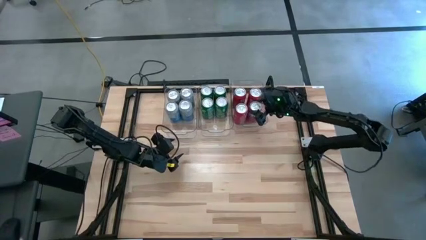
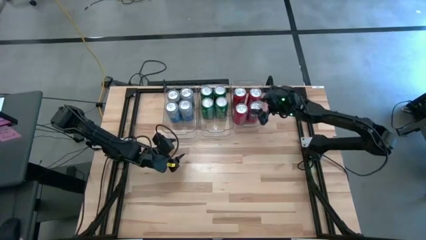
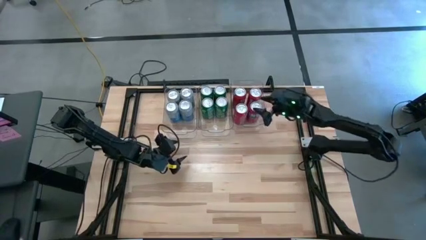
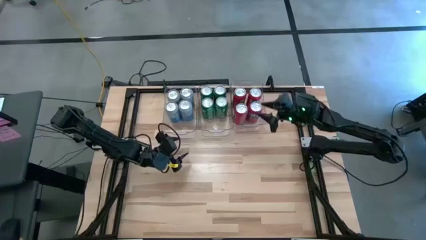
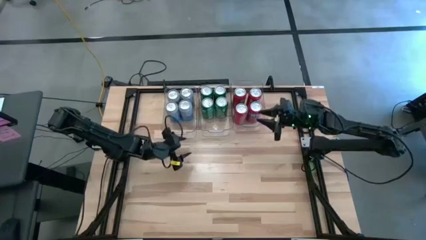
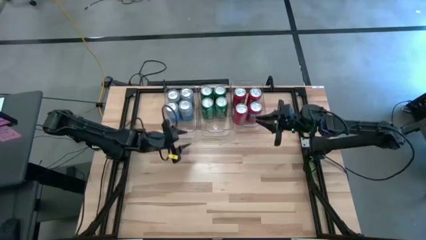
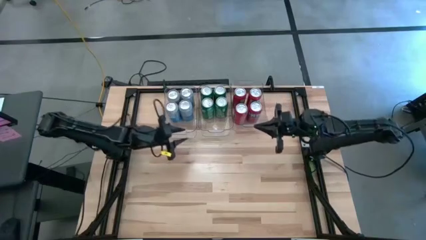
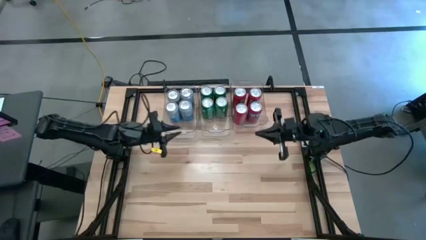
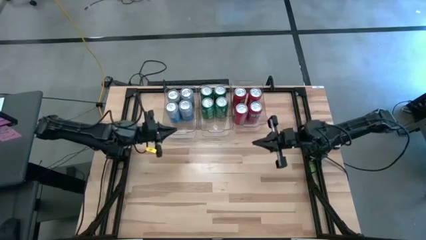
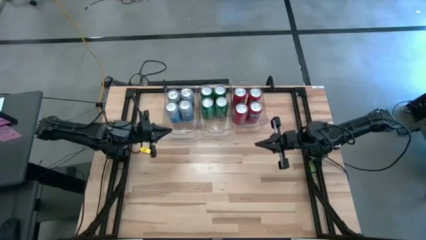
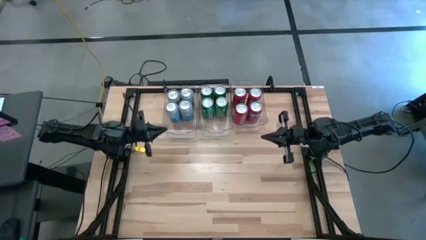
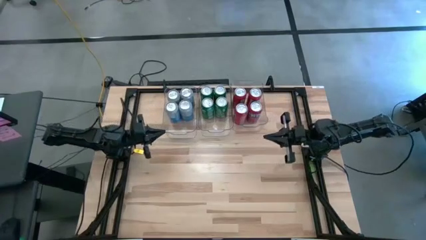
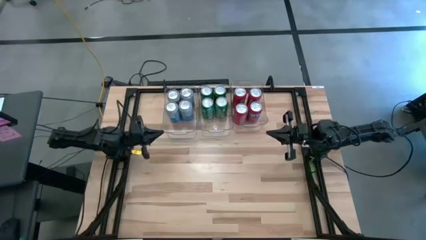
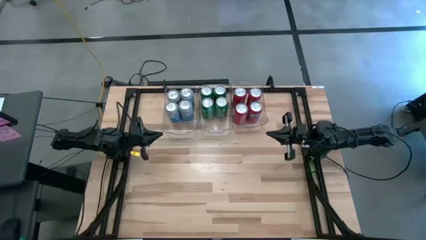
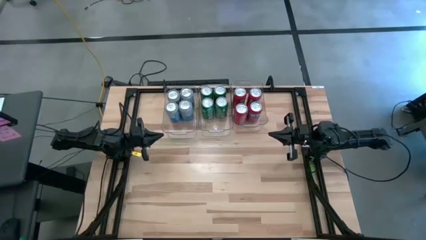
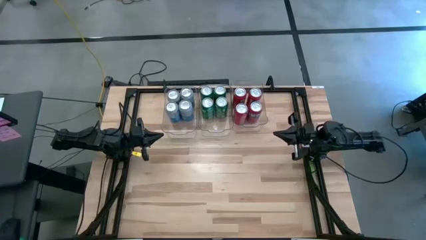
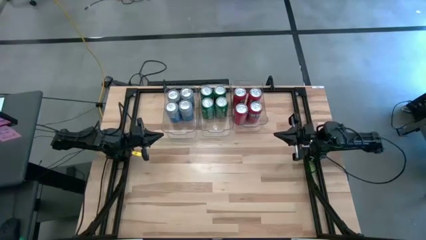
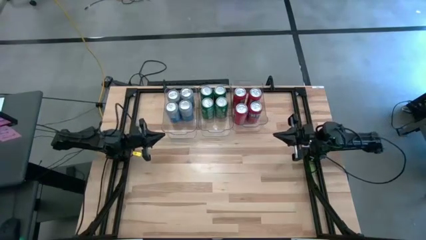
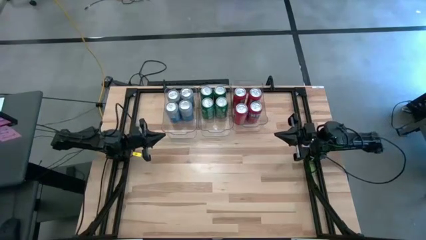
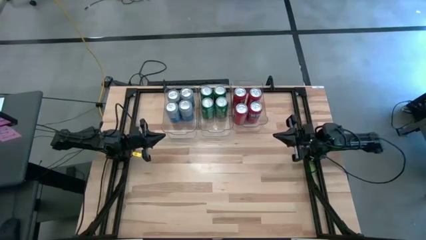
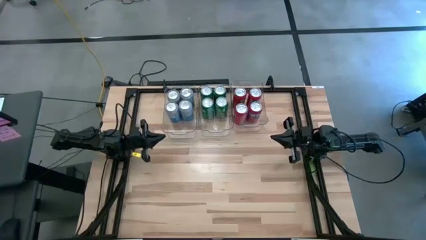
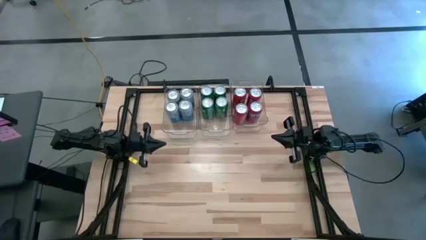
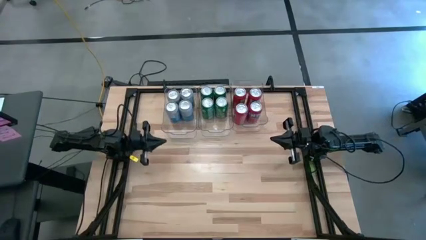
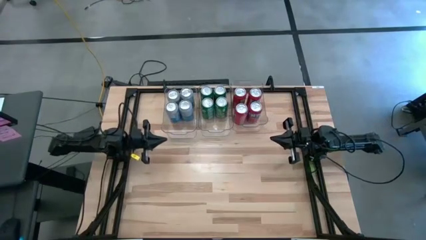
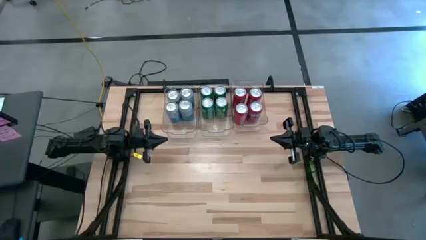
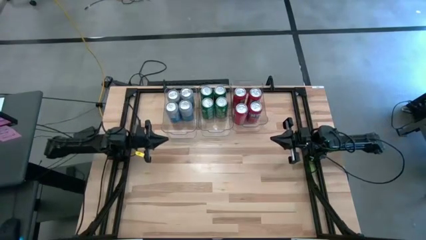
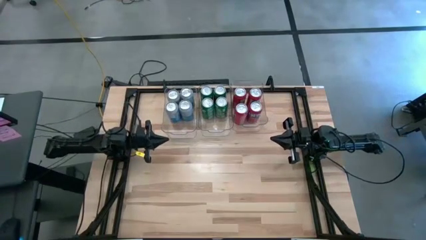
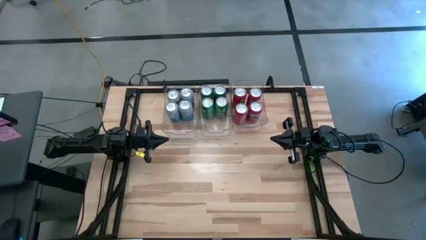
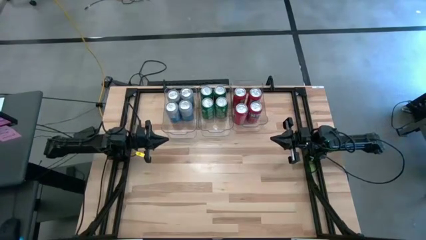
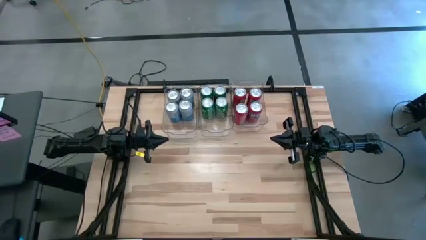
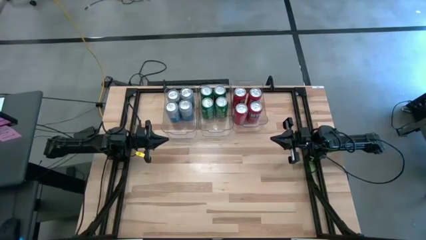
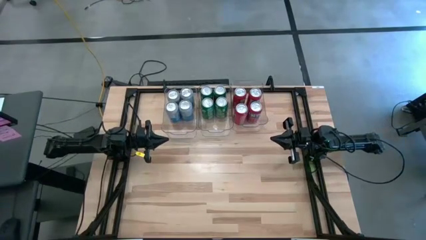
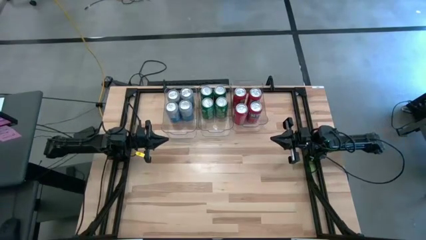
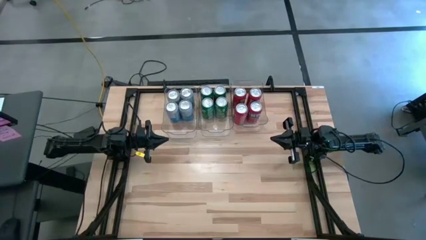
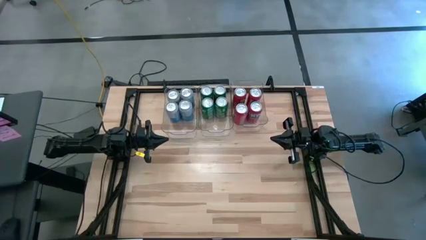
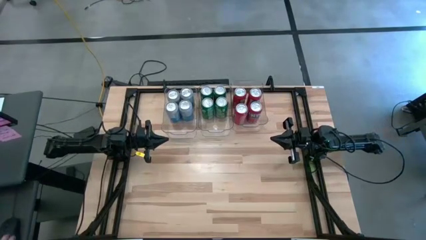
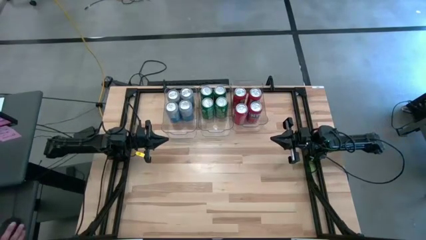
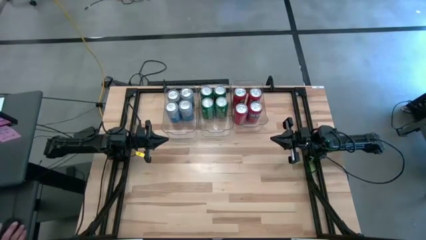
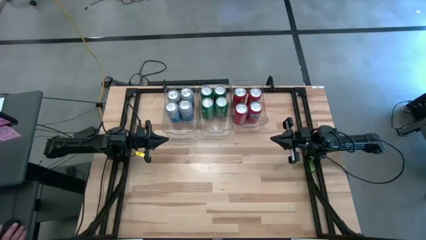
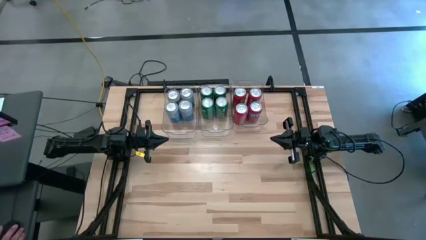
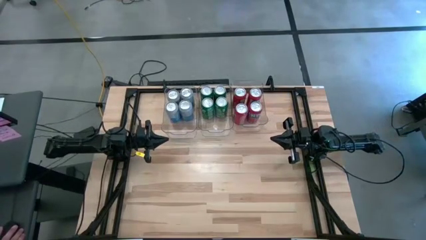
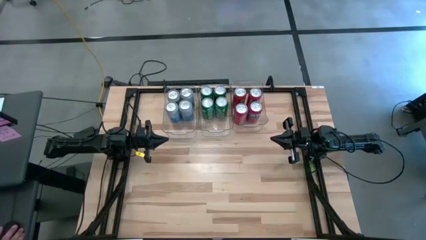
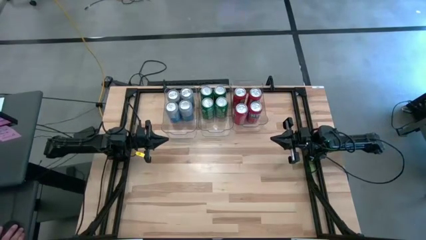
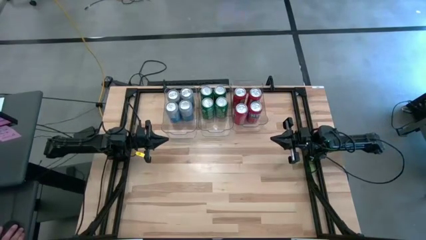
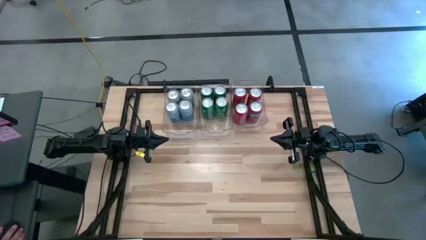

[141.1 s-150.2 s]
Task: Sort soda cans
Return to Home Position

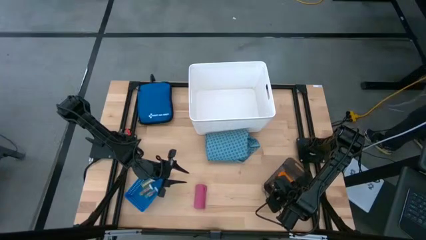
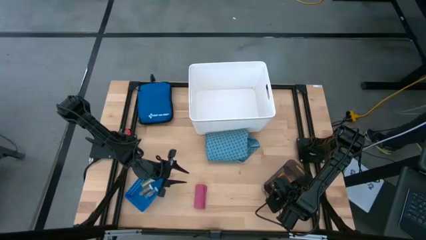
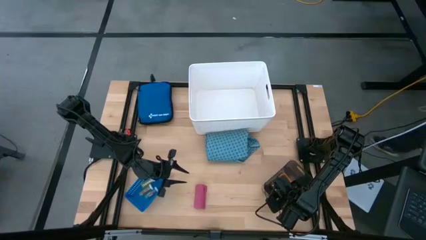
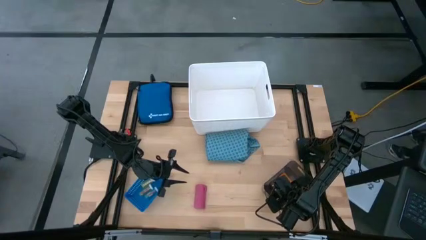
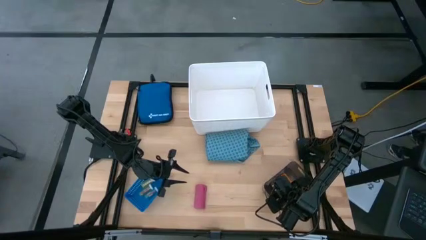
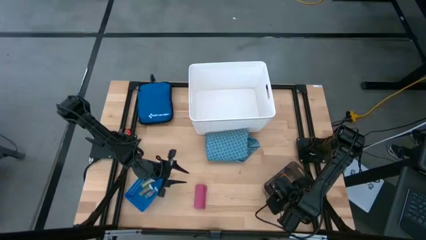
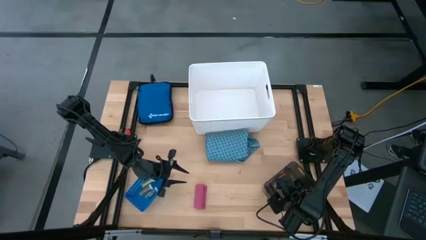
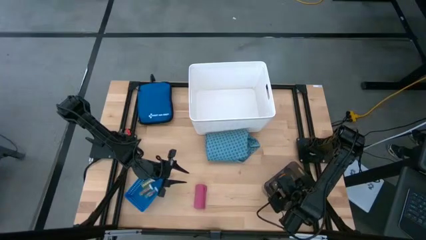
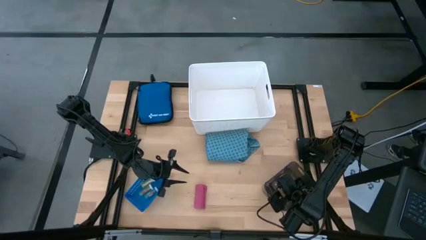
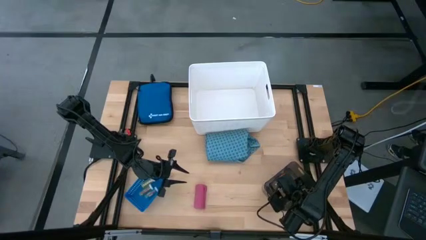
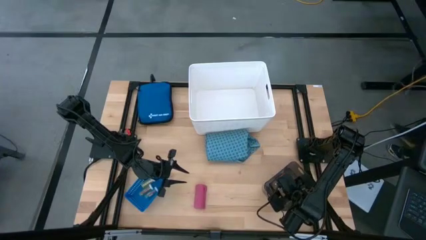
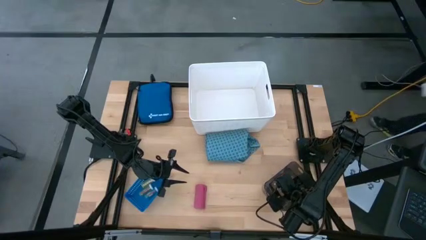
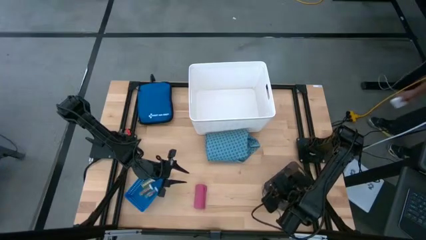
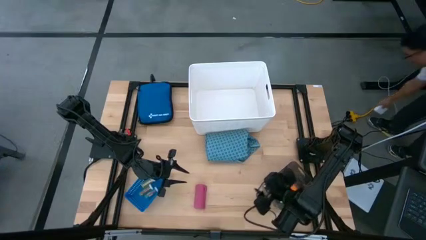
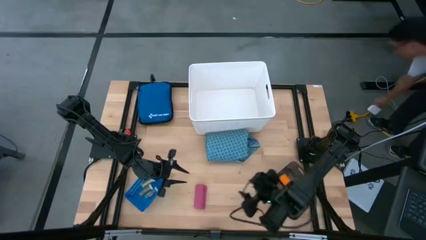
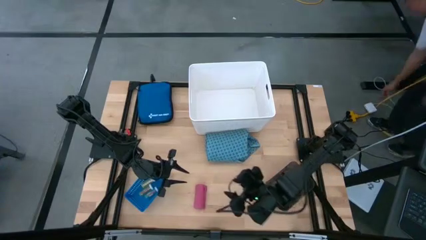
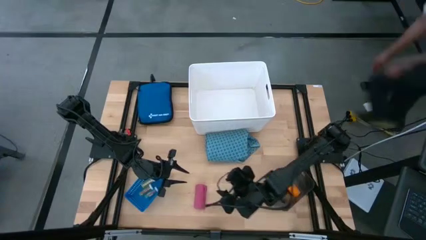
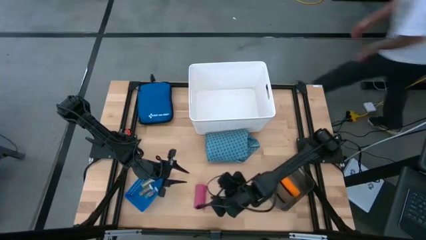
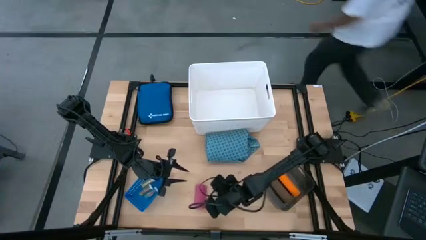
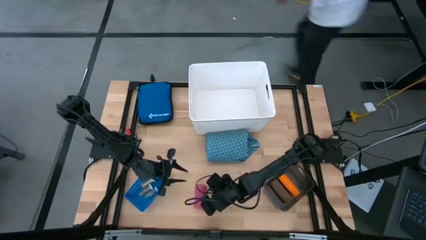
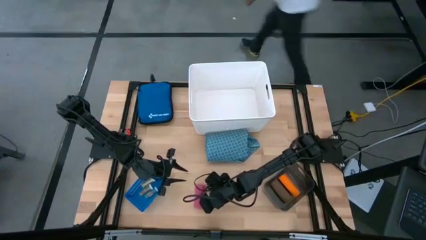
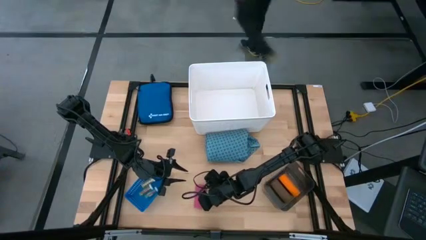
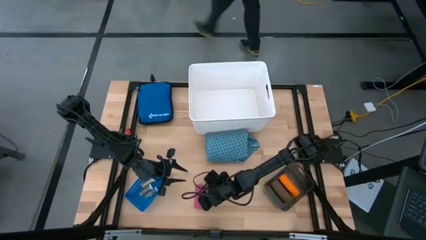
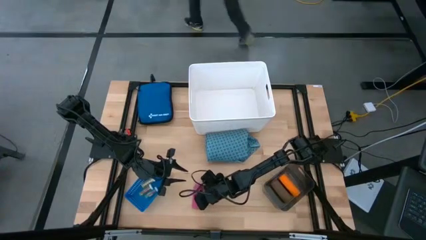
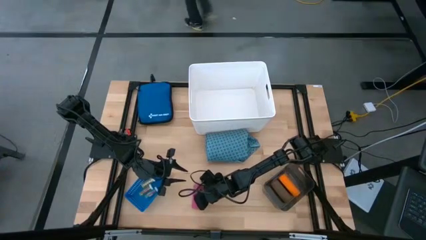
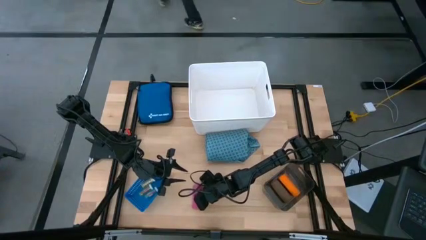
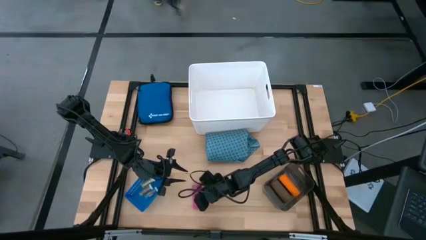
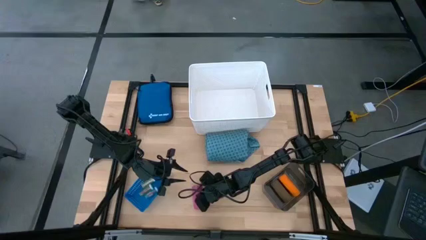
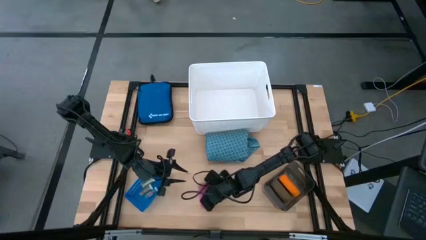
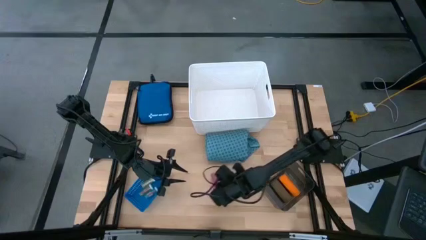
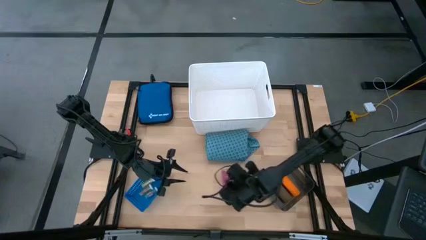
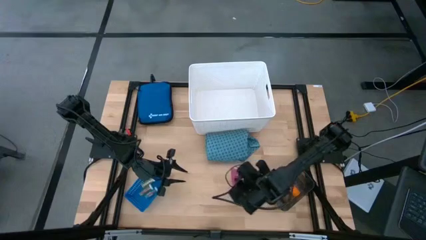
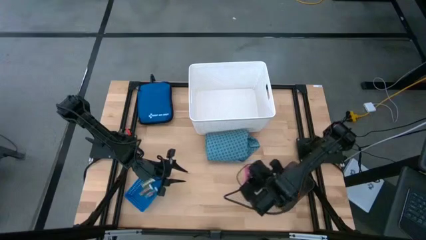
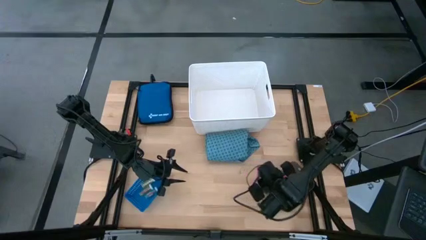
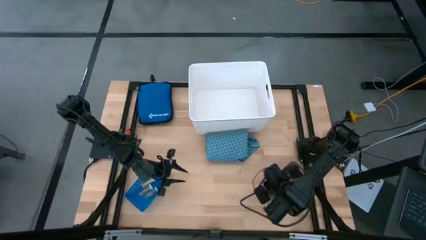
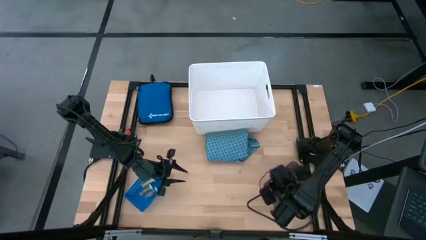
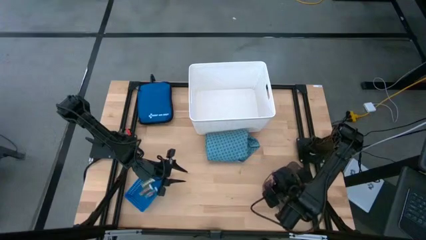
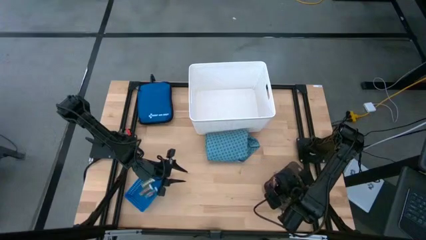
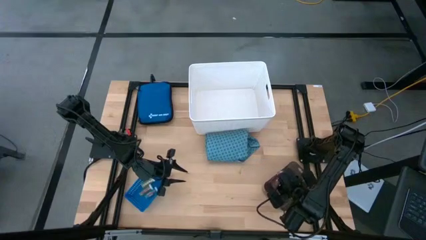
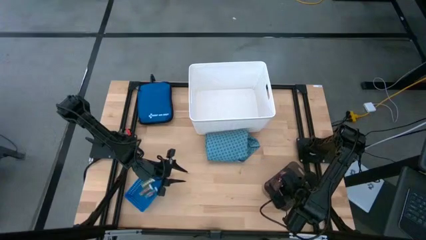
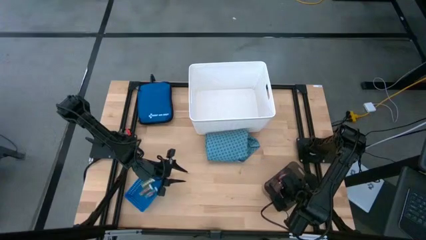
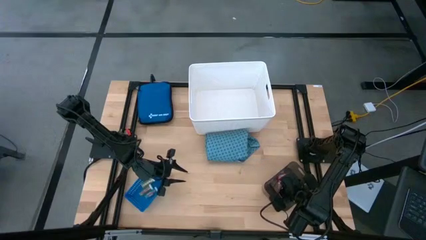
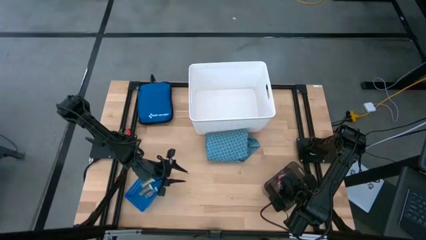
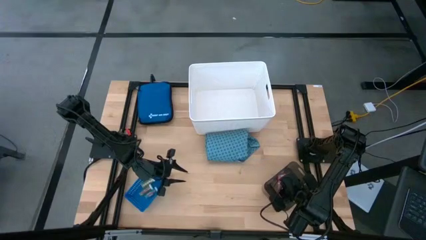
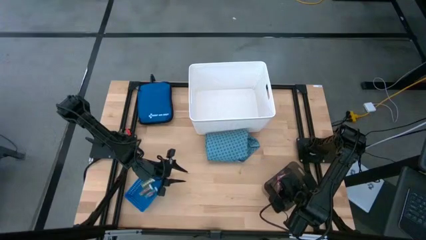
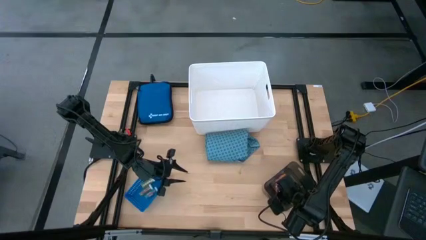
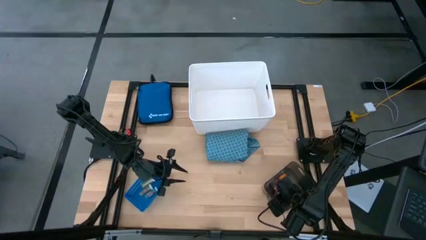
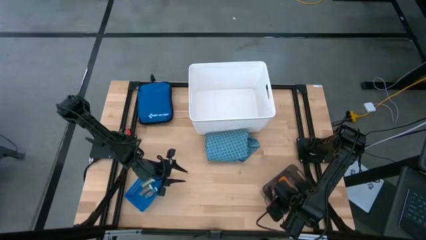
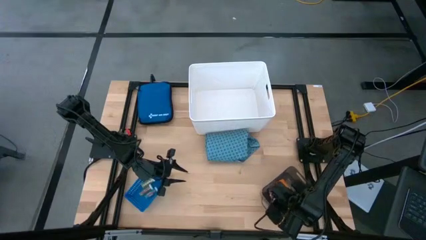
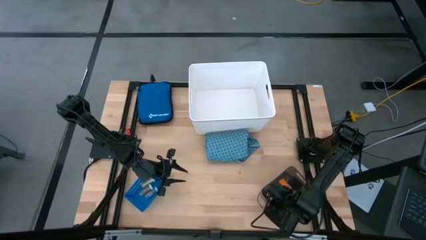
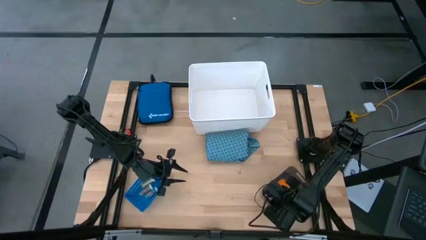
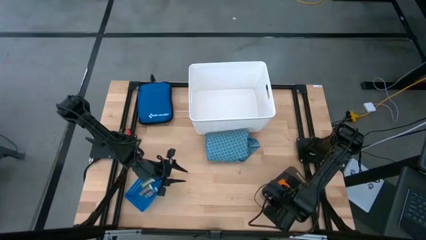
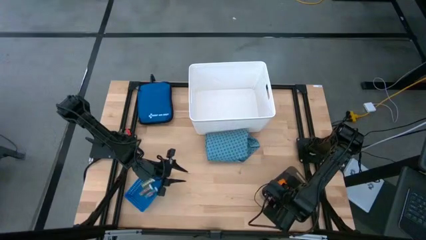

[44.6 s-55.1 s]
Task: Pick & Place Medicine items
Put the pink bandage into the black bin
